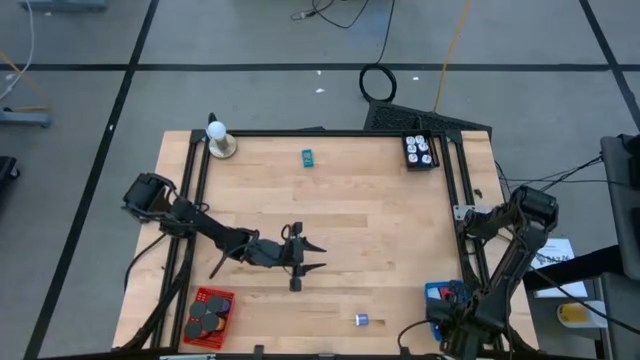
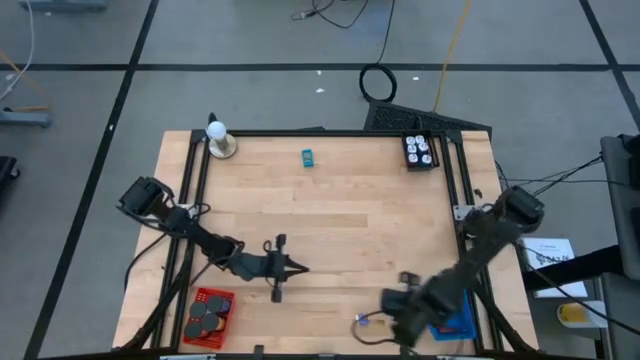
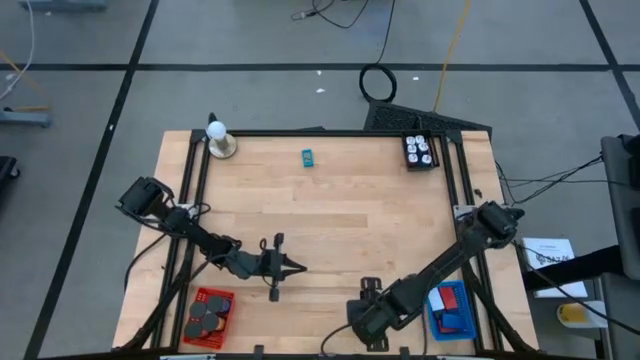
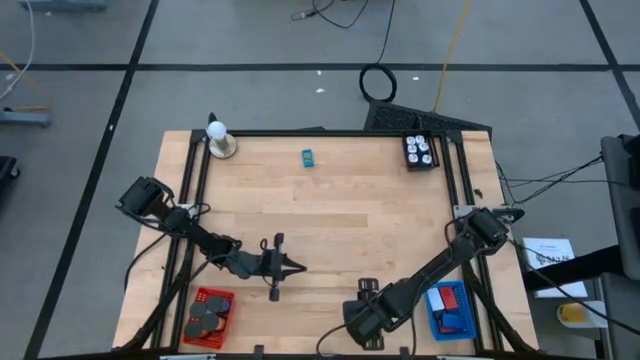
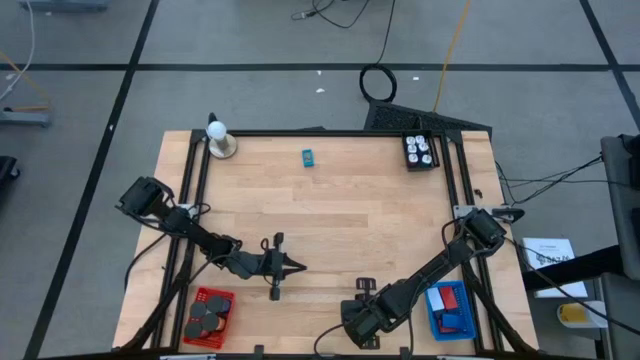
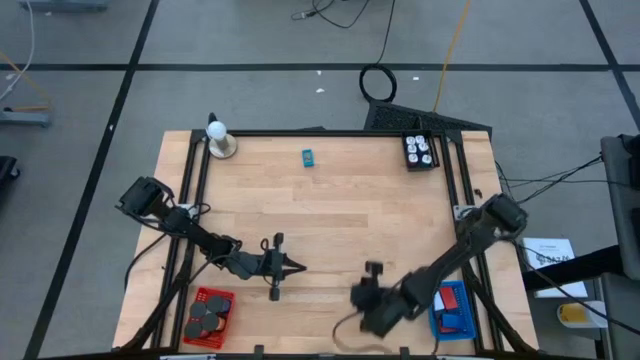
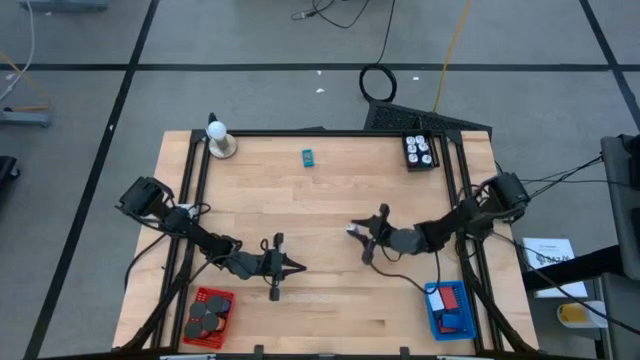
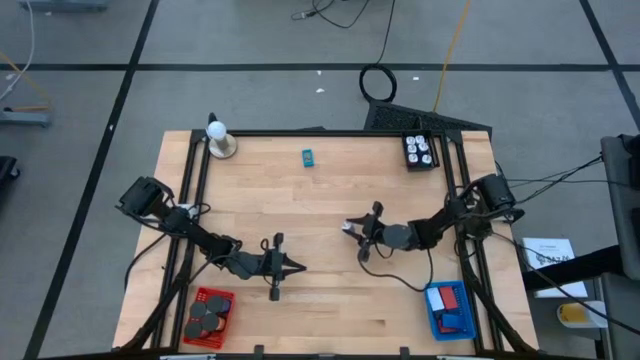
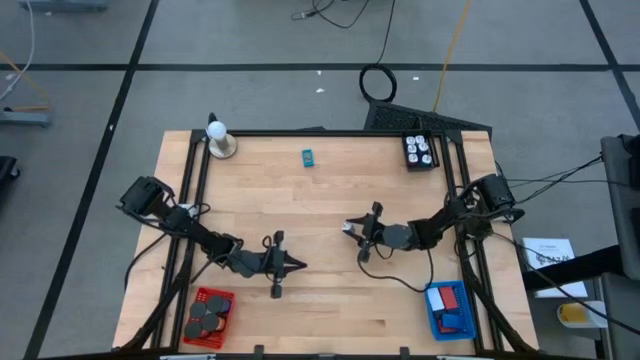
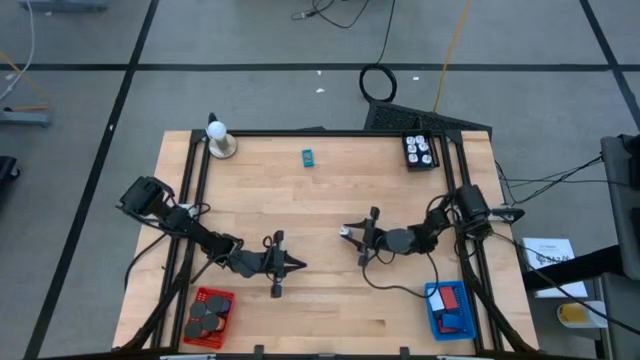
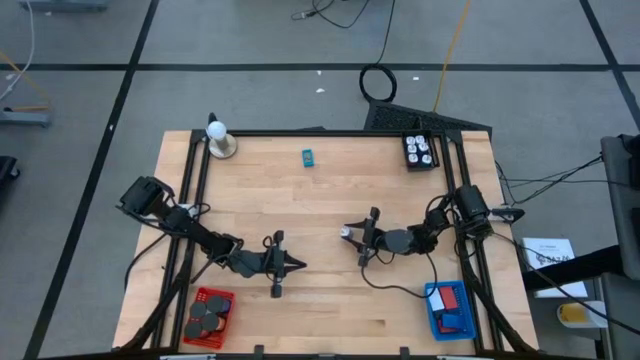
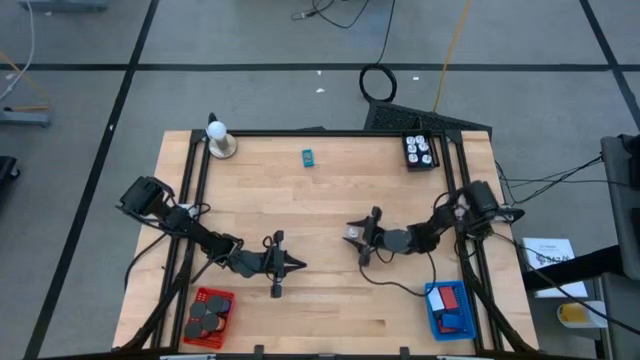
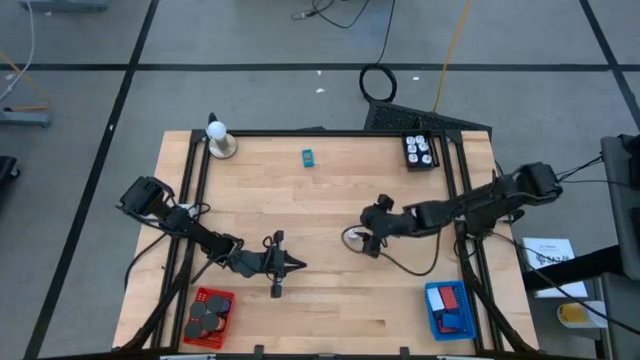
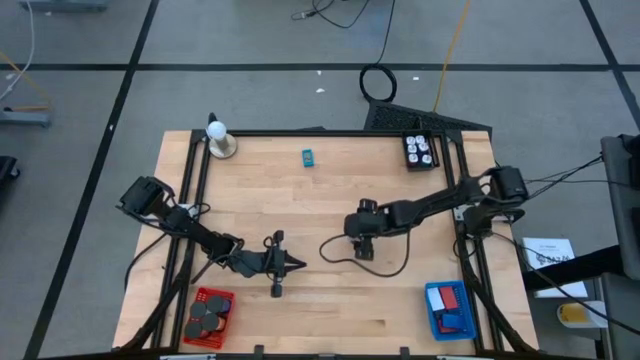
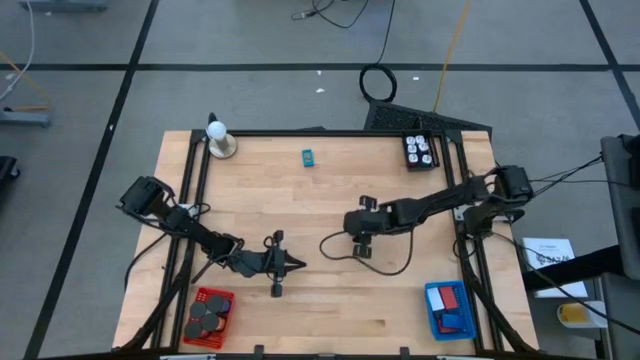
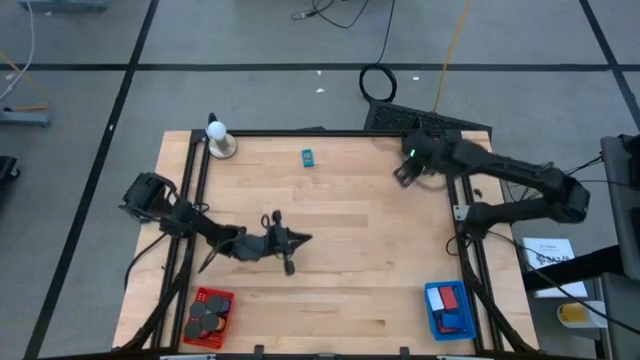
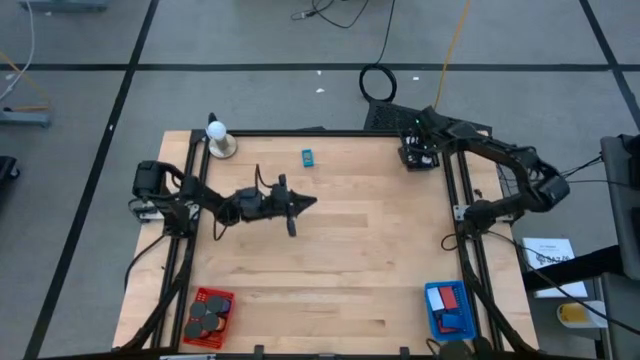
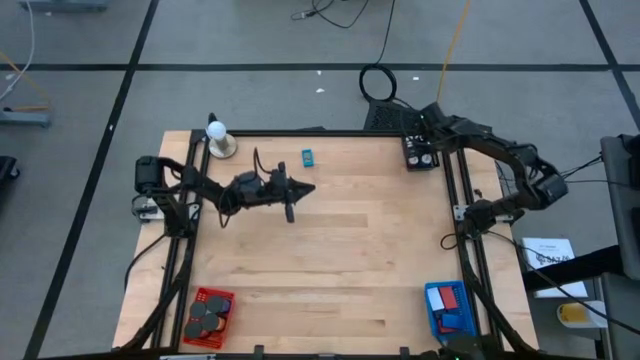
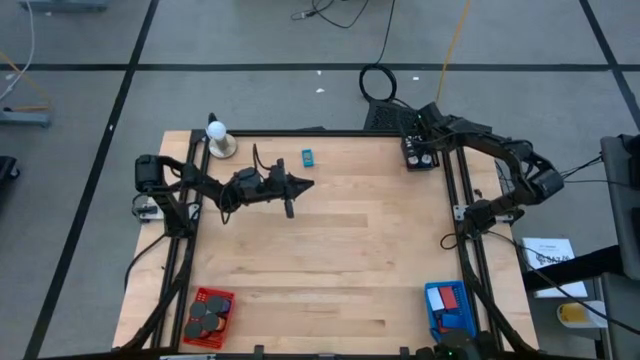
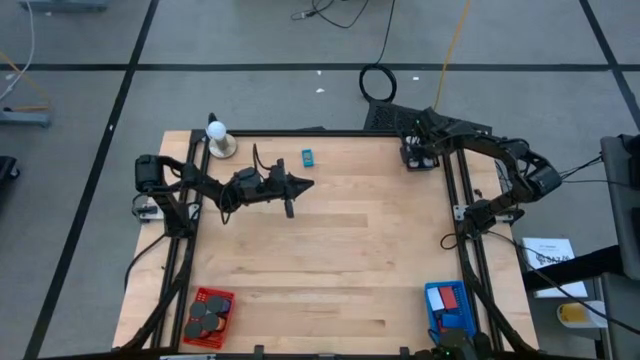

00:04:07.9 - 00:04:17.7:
Task: Pick & Place Office items
Put the violet charger adapter into the black bin

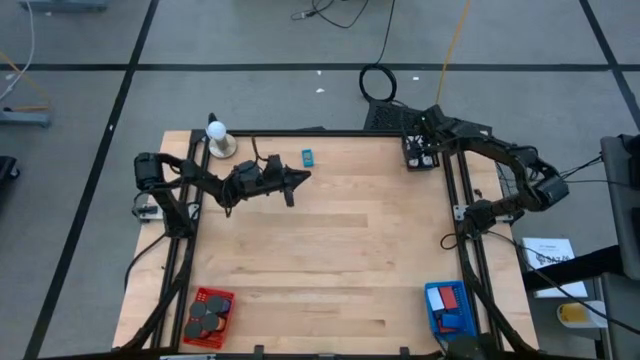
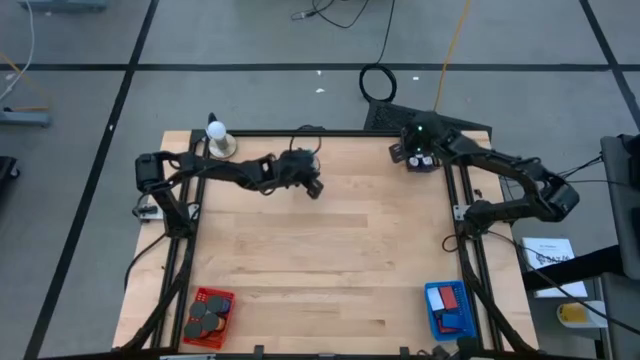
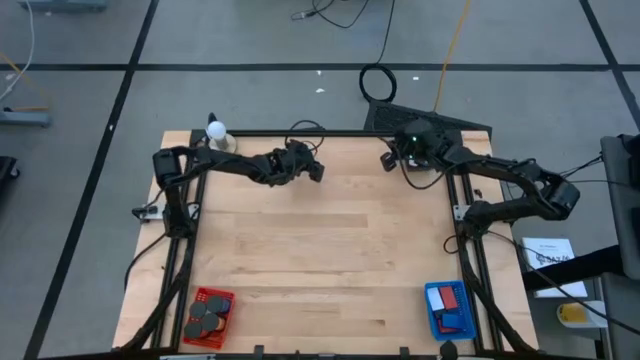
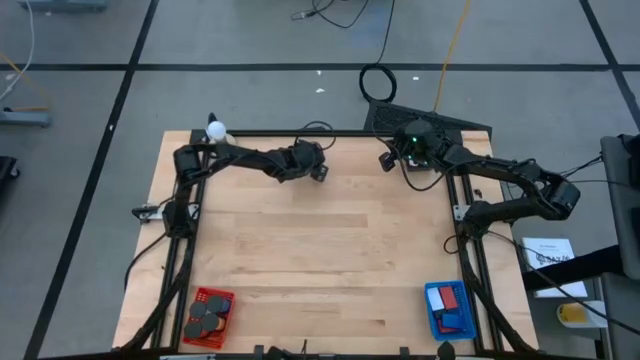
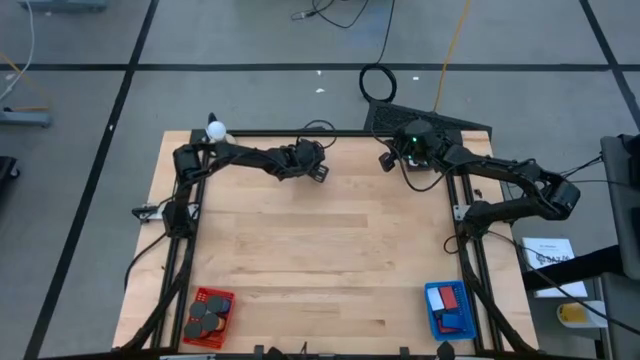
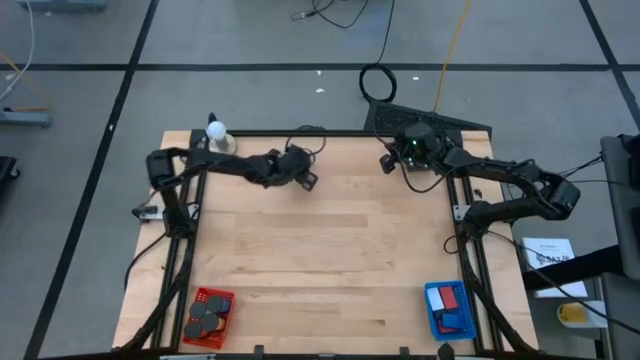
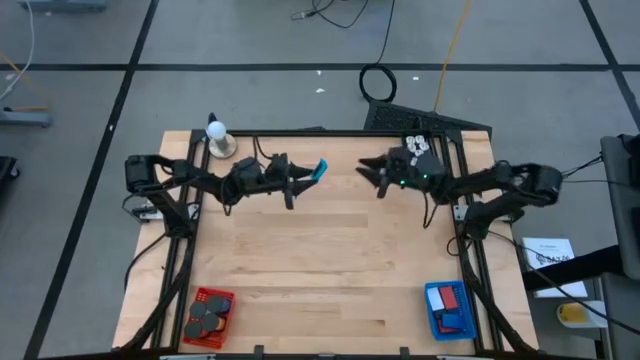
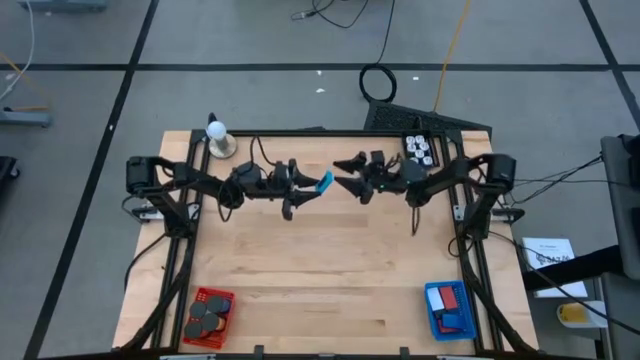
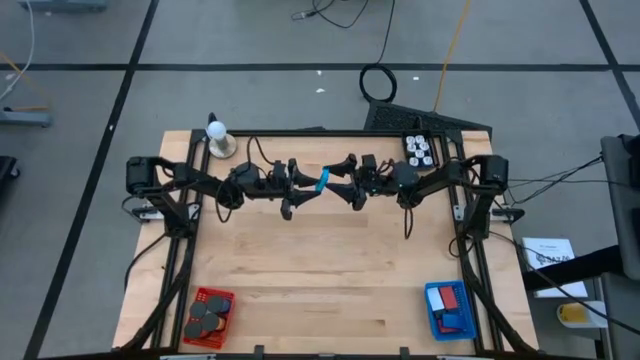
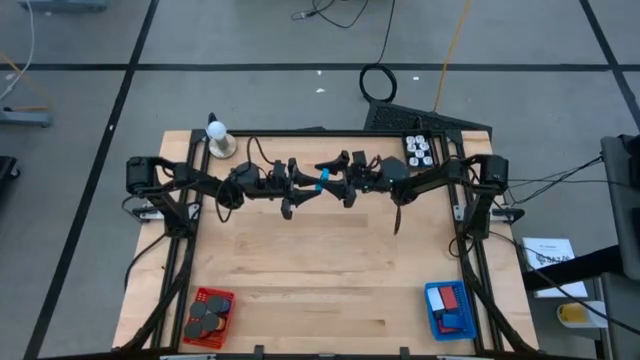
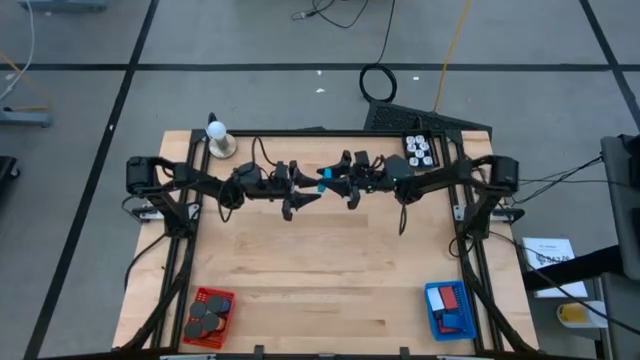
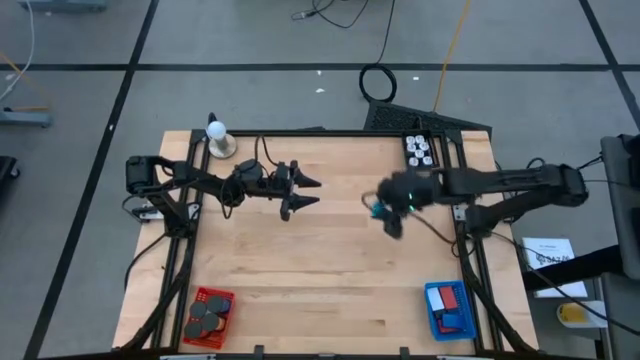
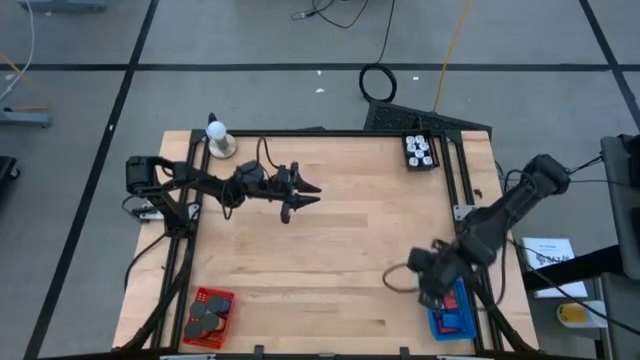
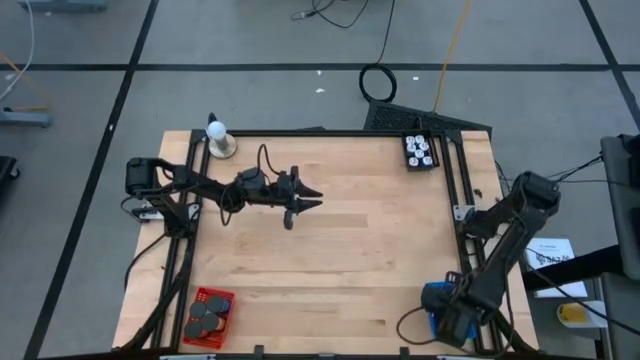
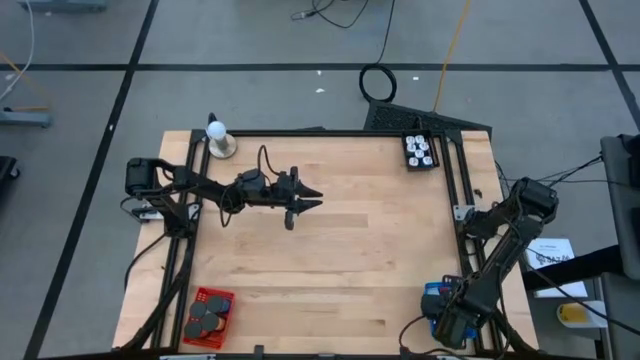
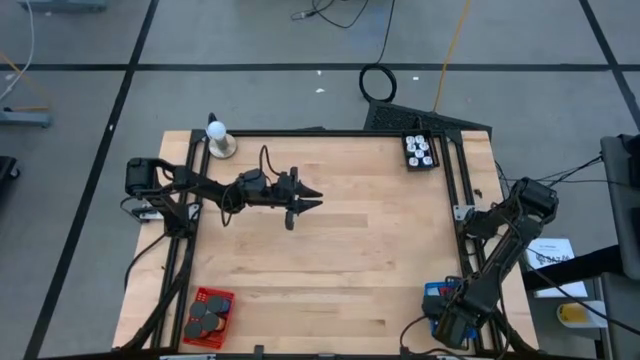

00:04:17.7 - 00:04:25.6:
Put the light blue digital clock into the blue bin

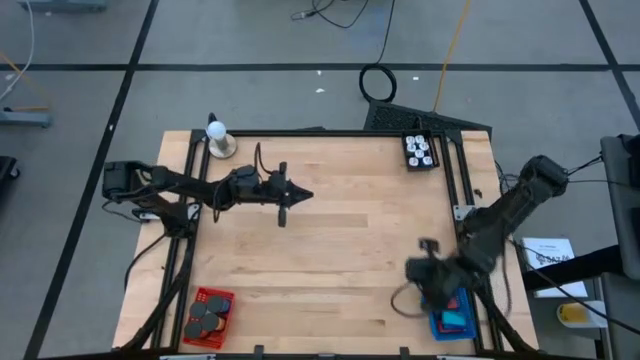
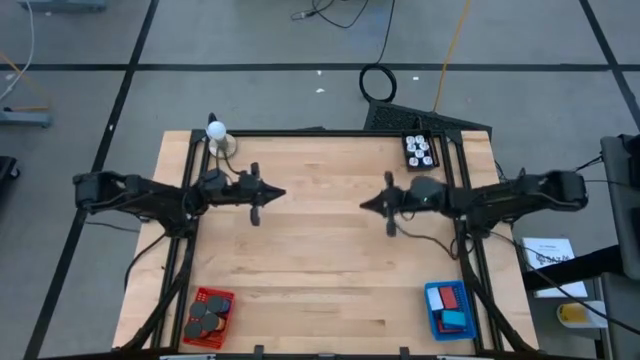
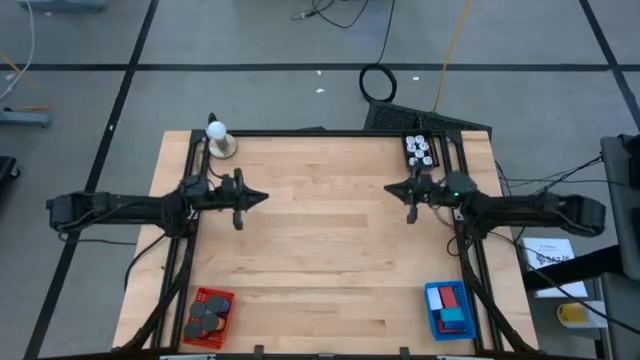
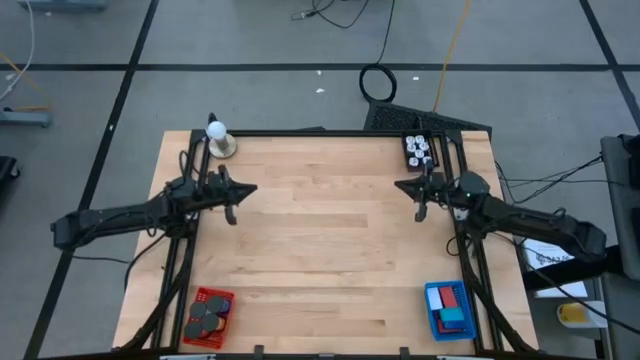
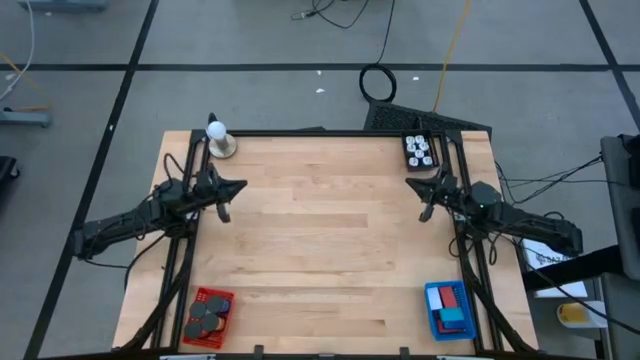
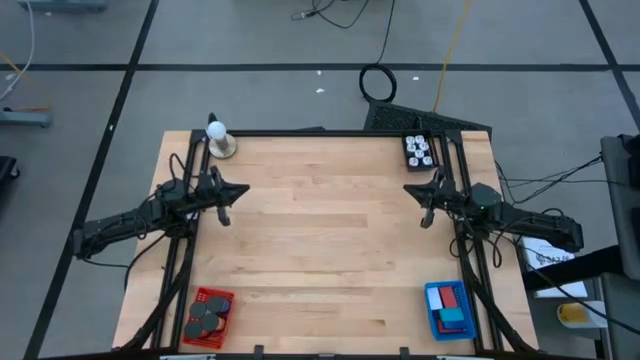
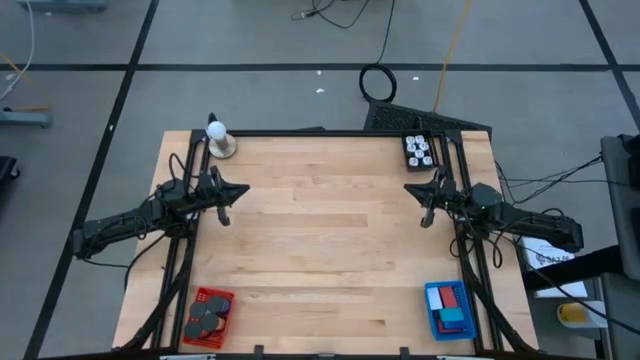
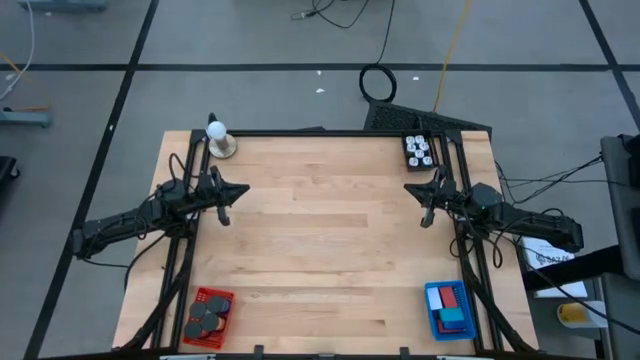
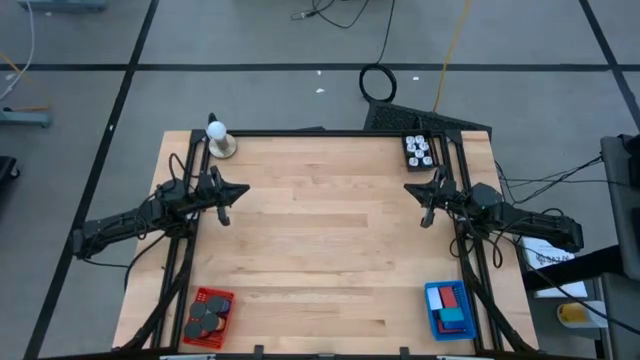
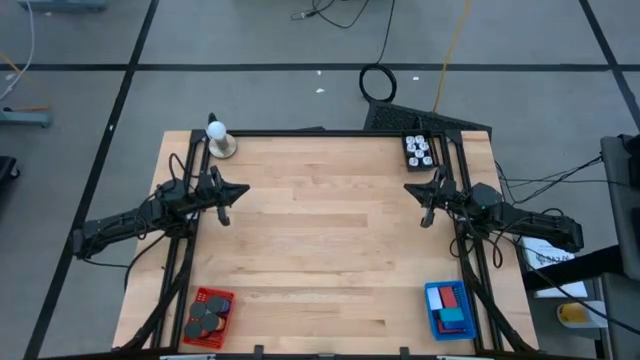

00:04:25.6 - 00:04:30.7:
Return to Home Position
